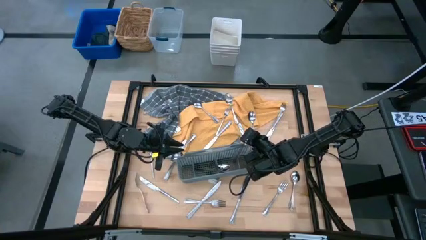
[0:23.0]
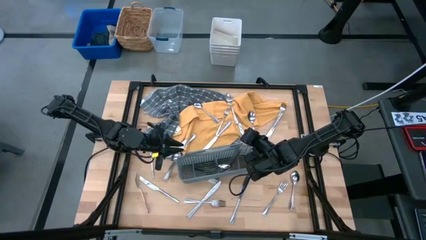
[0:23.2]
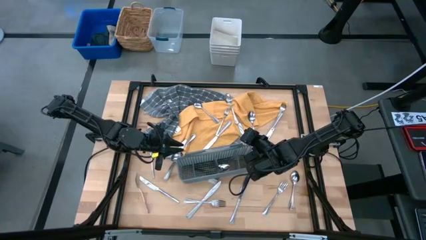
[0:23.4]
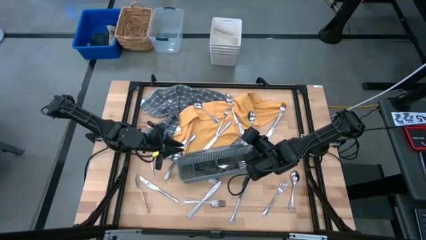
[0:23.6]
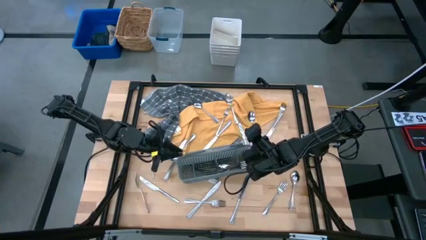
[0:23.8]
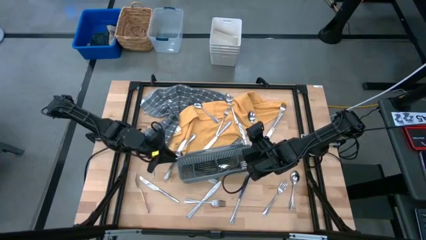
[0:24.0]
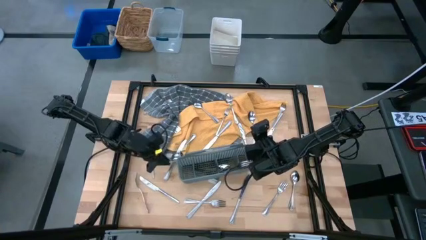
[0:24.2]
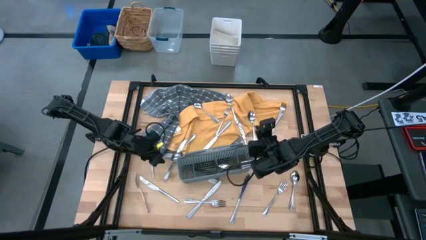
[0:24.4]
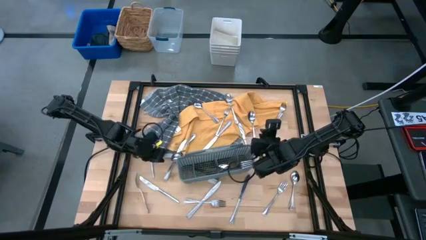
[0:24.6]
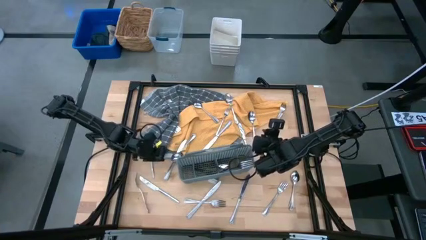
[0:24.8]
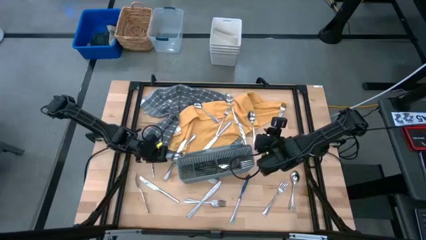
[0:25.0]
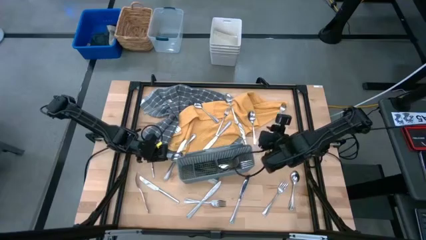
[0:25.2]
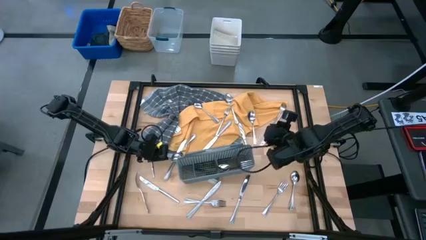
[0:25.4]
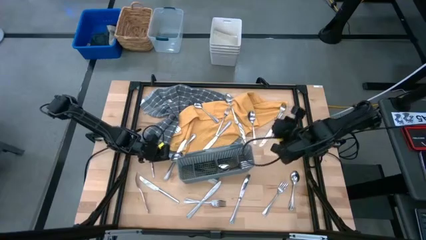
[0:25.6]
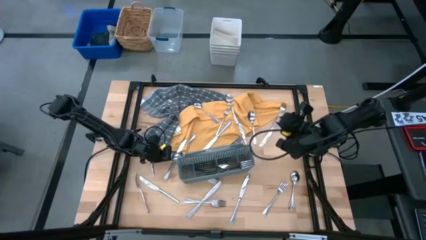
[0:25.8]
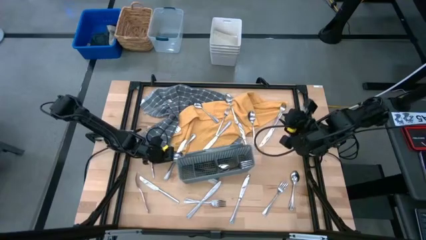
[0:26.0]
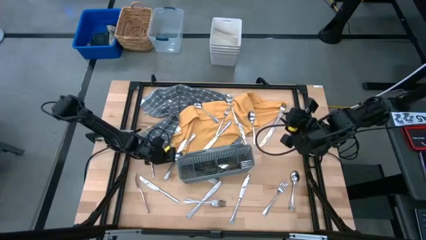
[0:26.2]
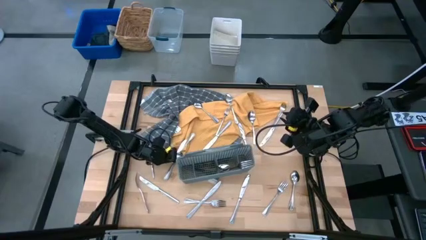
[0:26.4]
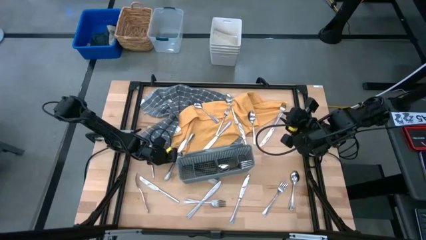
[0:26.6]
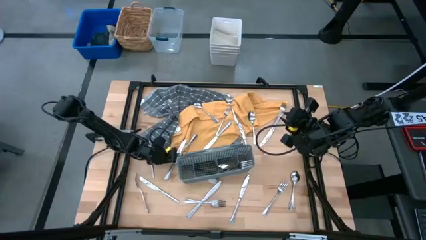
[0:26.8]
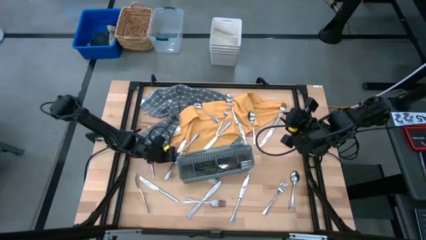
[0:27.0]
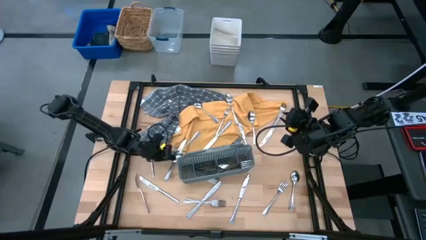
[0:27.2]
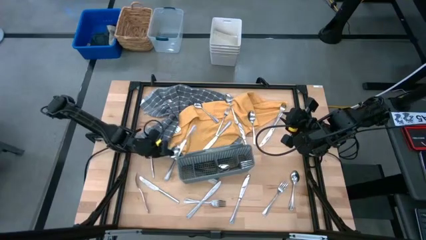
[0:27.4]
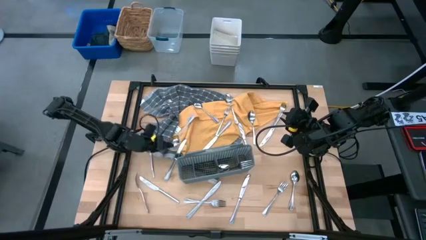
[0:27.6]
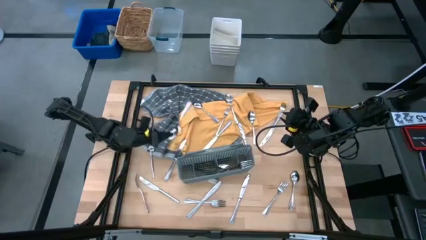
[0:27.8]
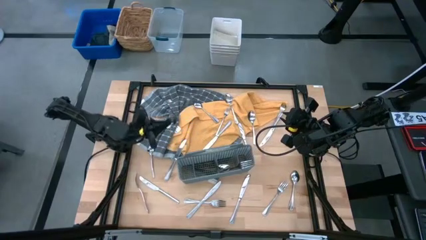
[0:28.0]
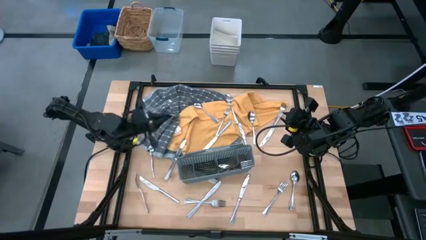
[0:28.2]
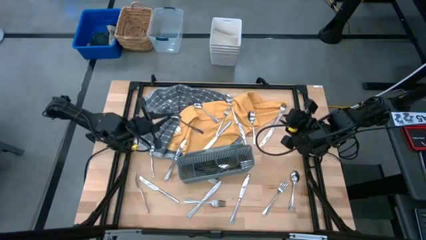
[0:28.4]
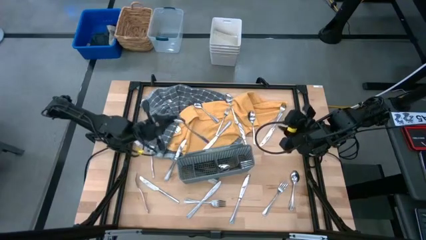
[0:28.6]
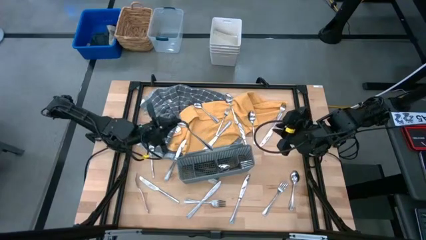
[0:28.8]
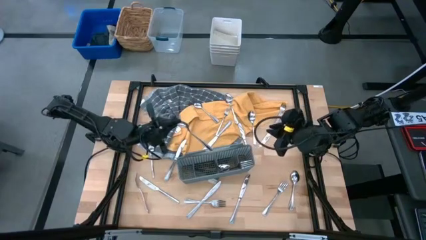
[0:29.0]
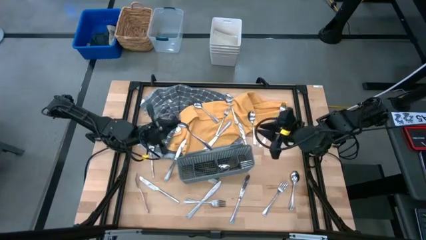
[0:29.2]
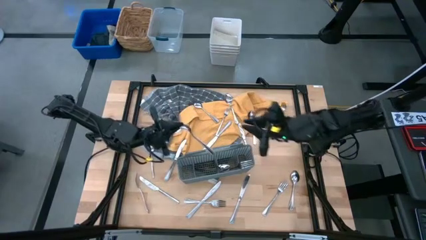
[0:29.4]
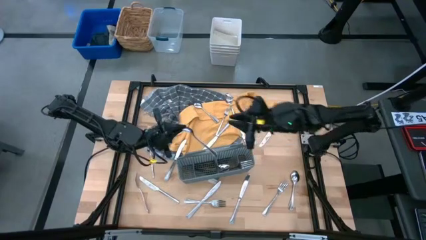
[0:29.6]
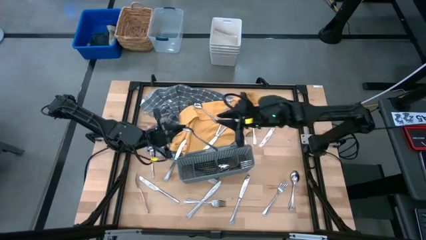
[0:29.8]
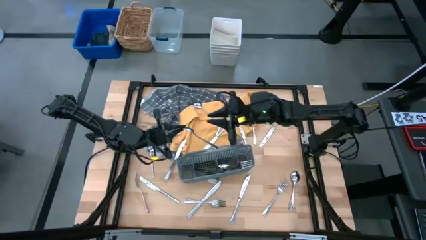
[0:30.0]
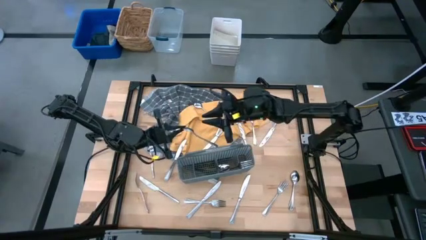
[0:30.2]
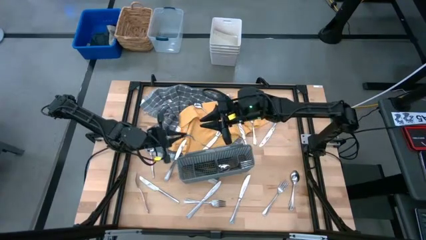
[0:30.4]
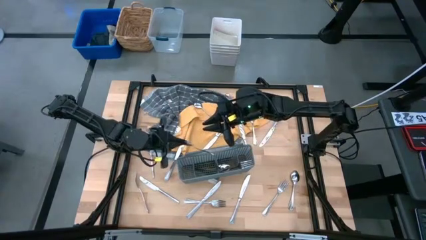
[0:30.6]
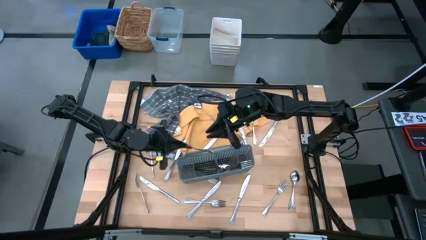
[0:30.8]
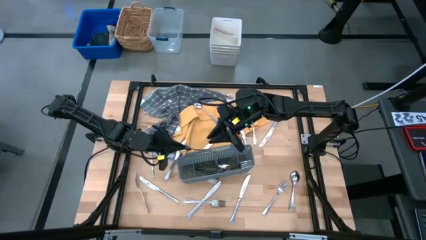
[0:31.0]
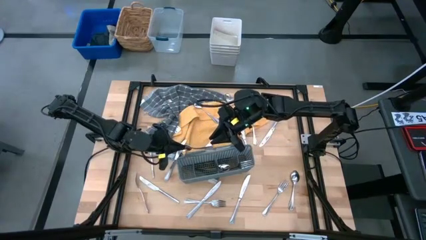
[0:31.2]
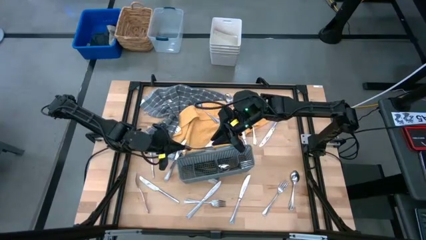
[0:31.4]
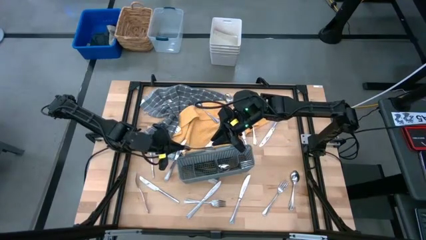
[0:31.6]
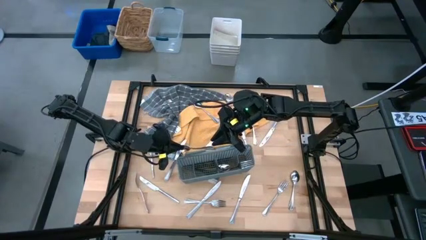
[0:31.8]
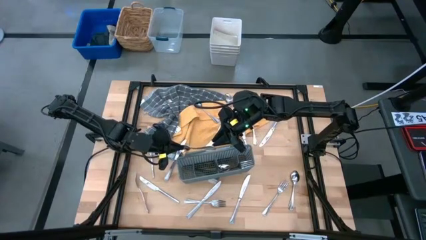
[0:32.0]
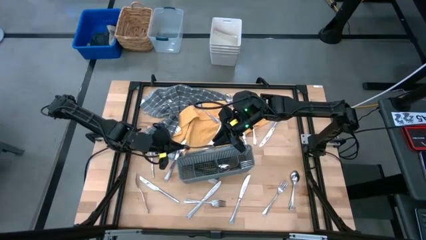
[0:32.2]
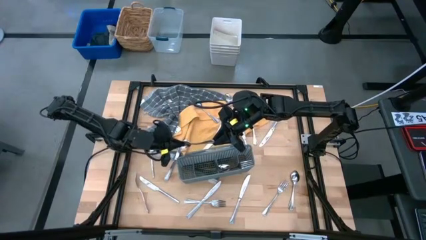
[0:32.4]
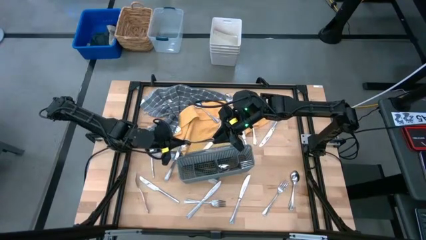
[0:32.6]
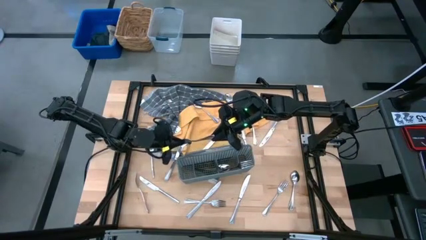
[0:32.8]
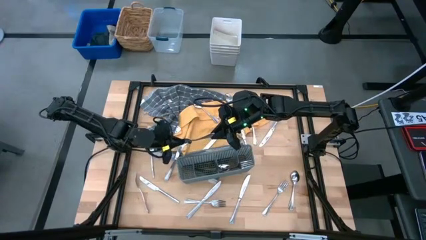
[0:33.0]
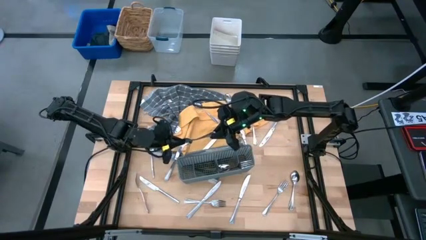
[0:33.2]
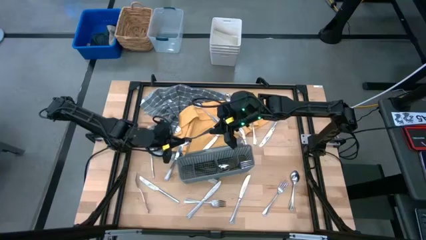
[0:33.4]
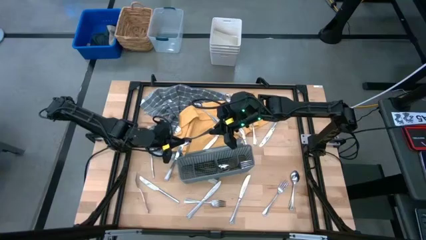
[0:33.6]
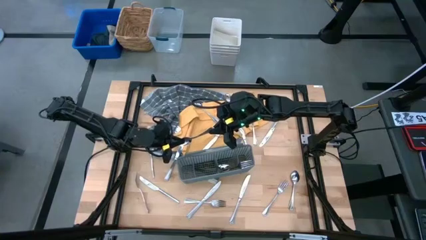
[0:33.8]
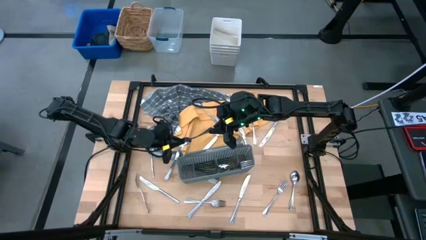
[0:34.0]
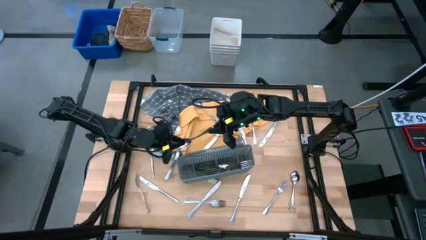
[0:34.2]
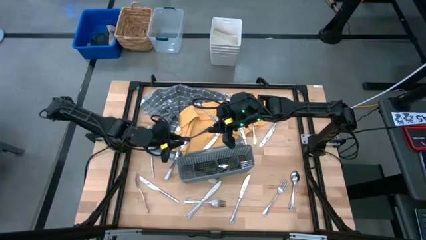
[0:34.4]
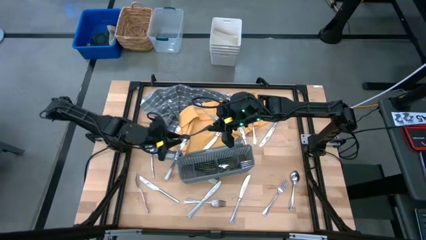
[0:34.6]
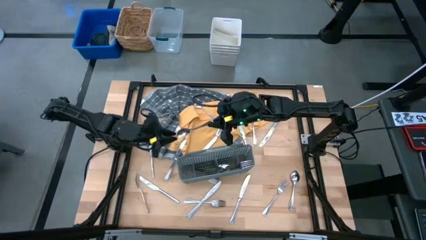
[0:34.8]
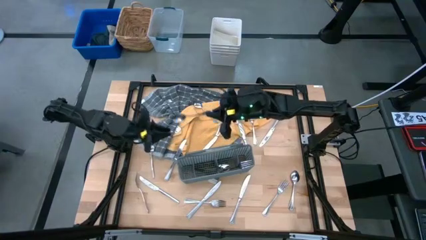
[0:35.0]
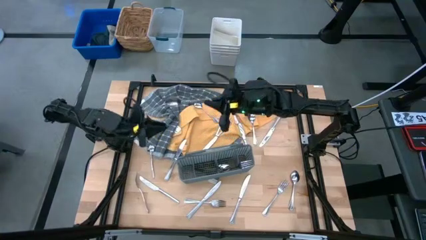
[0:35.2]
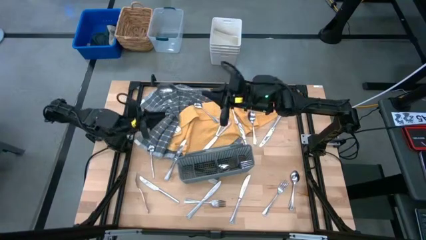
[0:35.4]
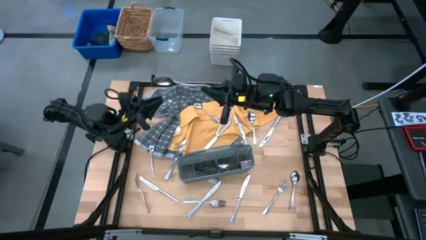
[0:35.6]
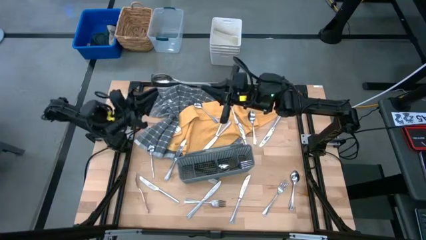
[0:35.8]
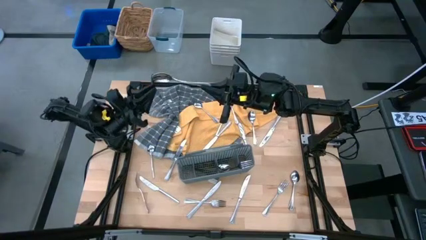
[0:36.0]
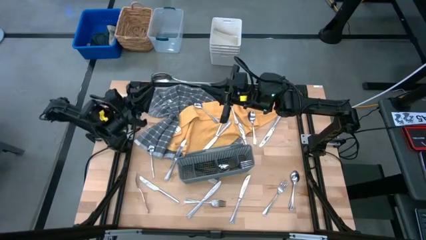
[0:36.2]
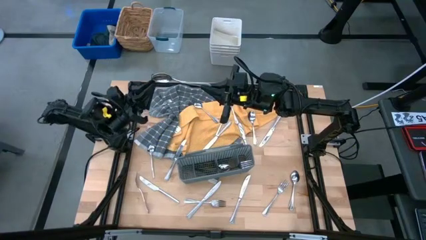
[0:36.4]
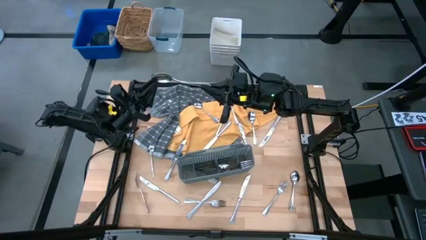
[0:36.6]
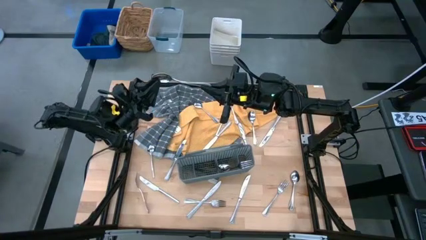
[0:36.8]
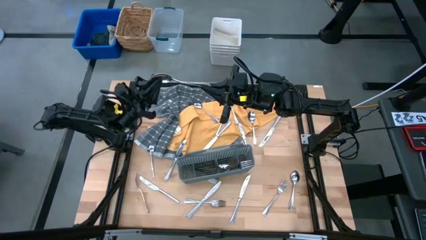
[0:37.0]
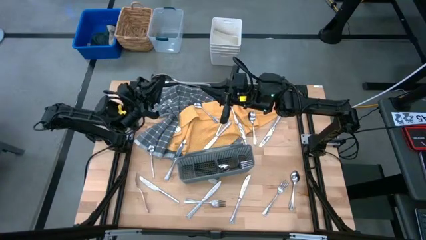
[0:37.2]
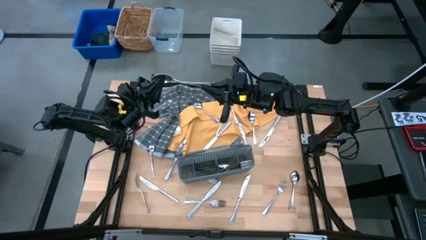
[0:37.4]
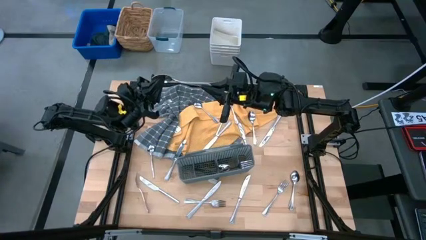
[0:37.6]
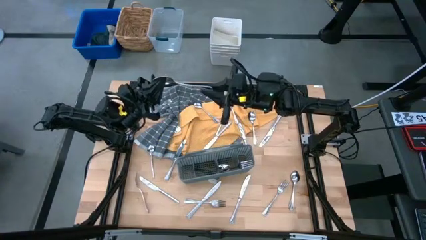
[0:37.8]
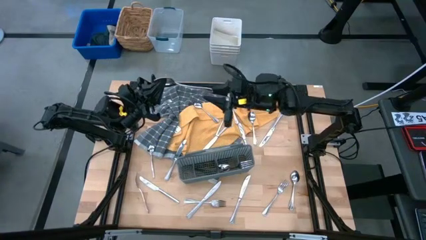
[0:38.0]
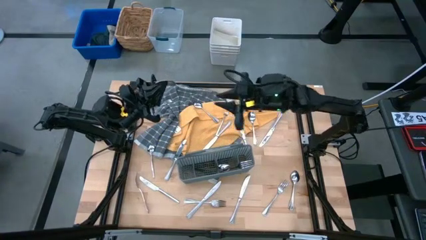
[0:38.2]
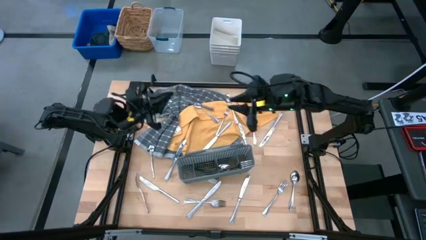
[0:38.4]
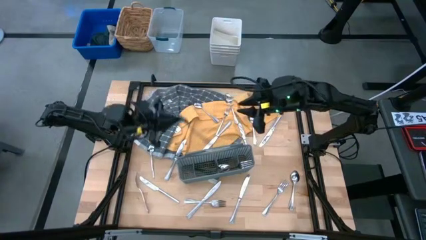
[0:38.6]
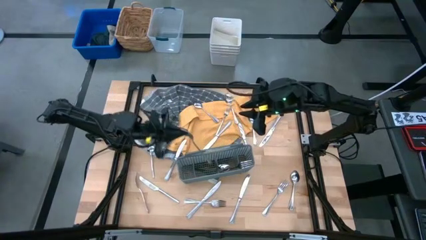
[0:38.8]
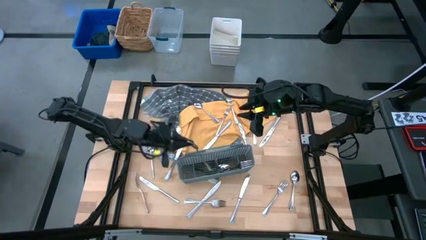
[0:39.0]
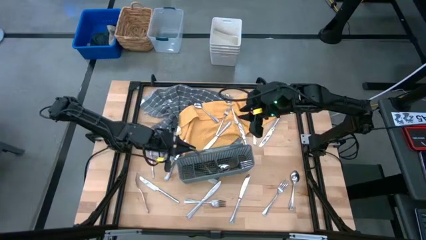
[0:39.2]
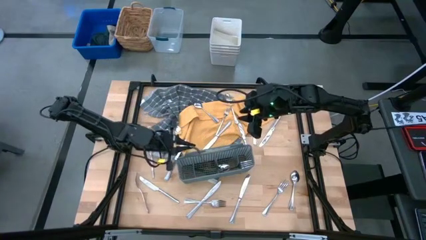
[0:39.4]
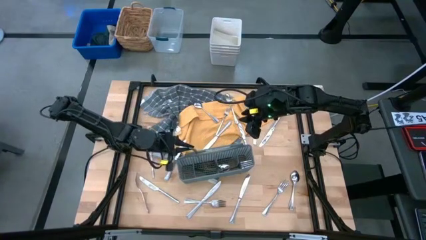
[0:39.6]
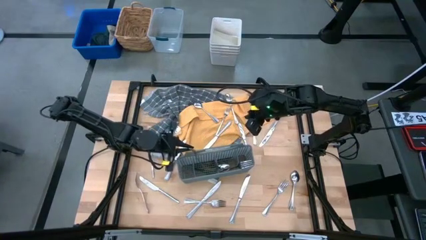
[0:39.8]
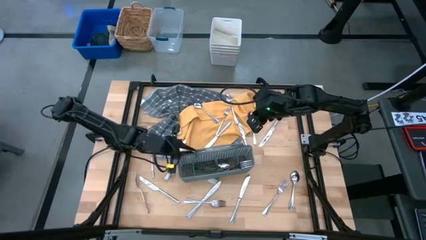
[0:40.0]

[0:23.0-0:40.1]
Task: Sort silverware
Put the silver spoon into the gray silverware basket
